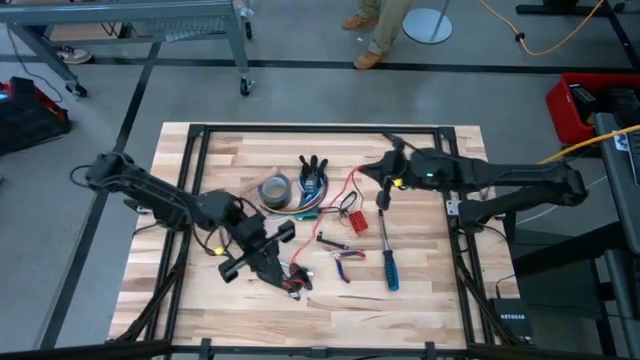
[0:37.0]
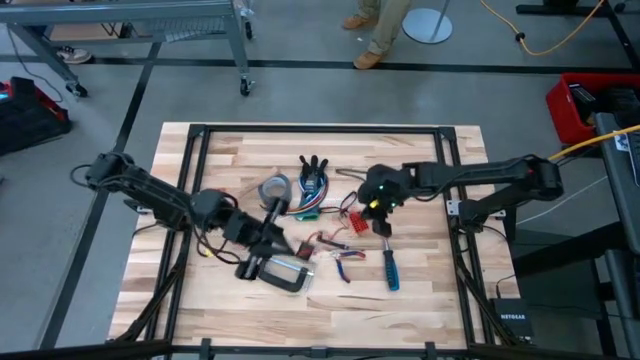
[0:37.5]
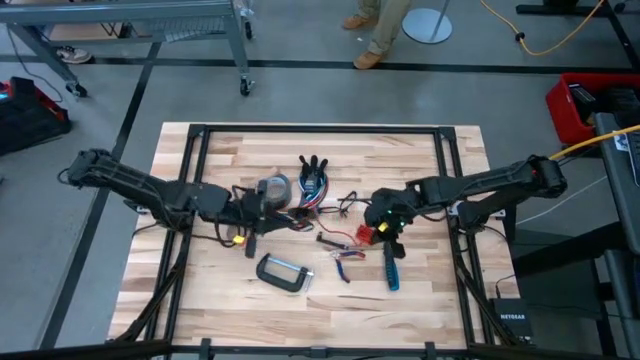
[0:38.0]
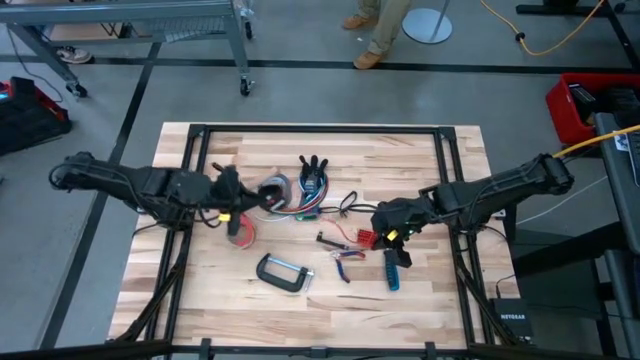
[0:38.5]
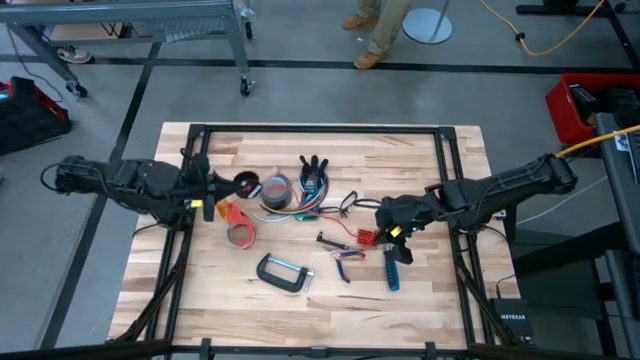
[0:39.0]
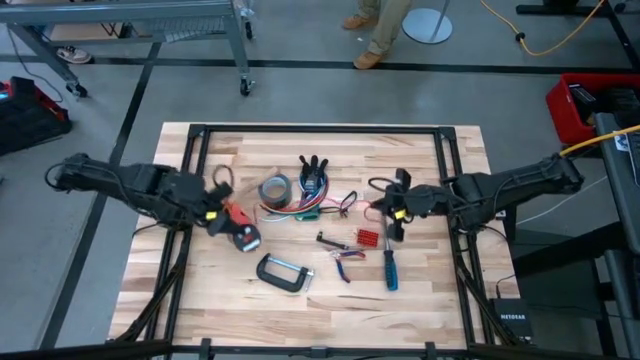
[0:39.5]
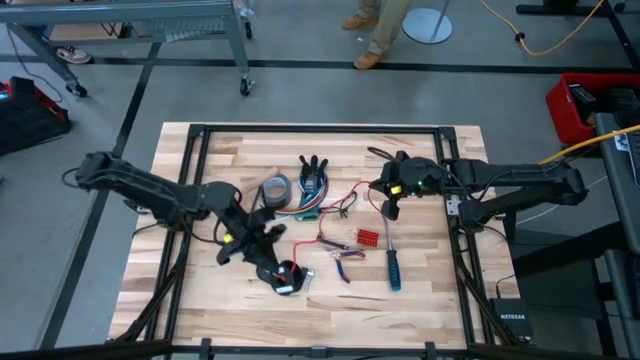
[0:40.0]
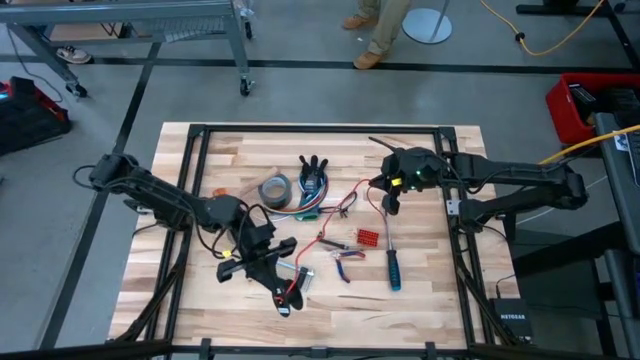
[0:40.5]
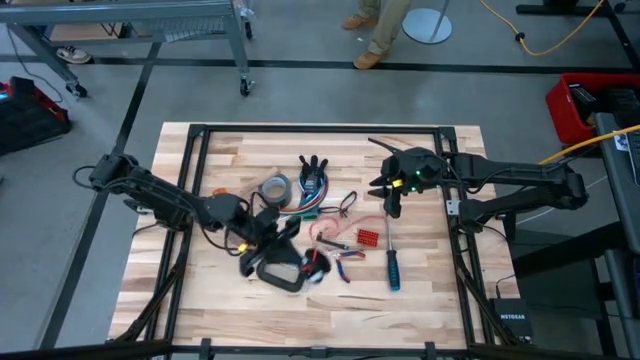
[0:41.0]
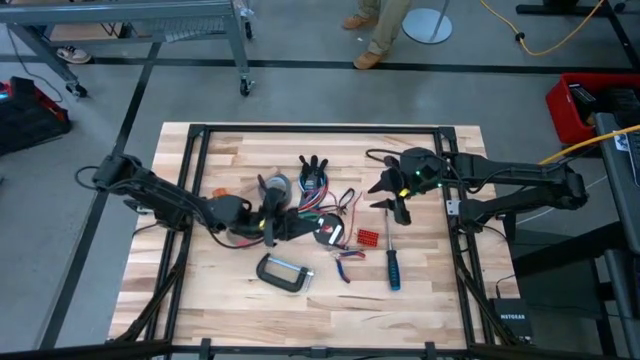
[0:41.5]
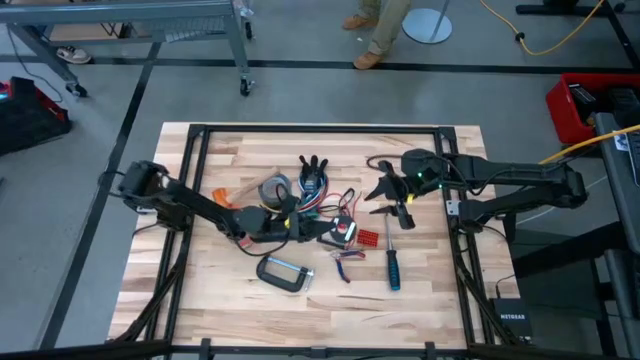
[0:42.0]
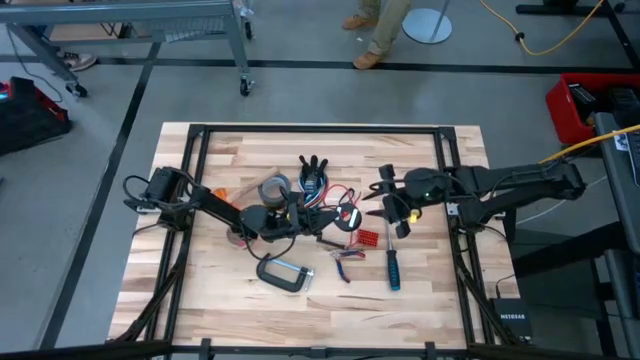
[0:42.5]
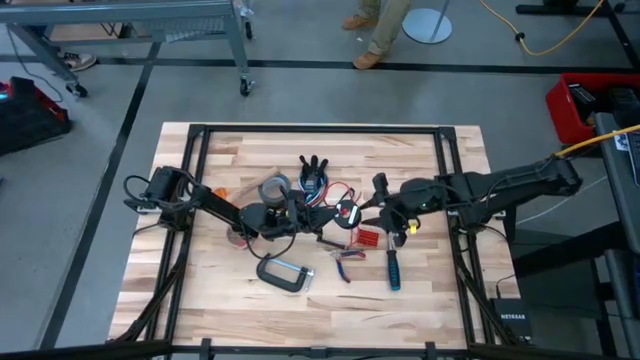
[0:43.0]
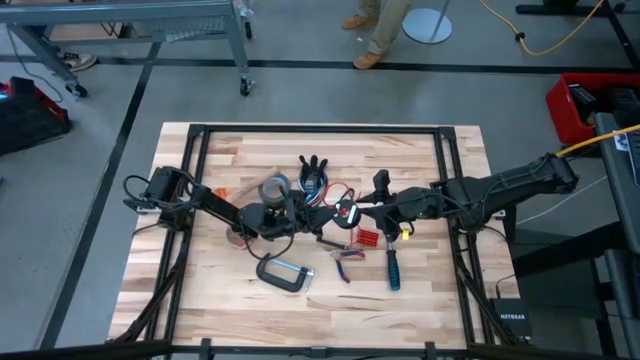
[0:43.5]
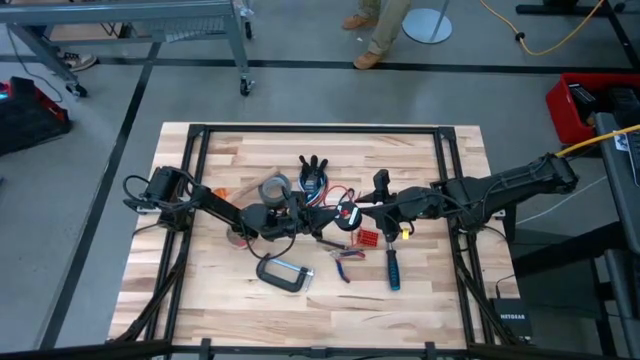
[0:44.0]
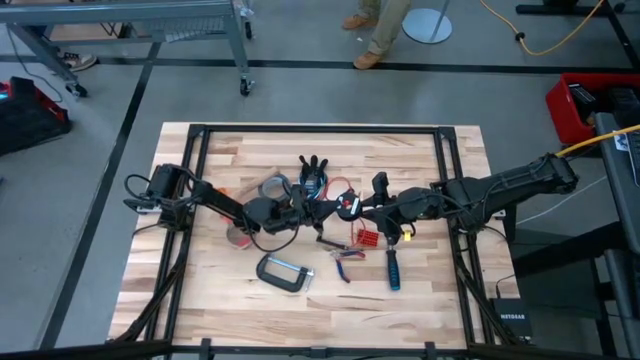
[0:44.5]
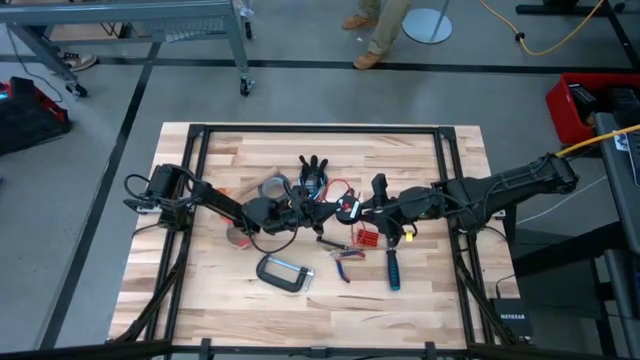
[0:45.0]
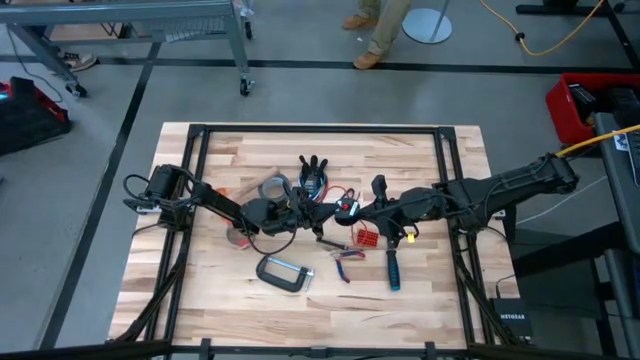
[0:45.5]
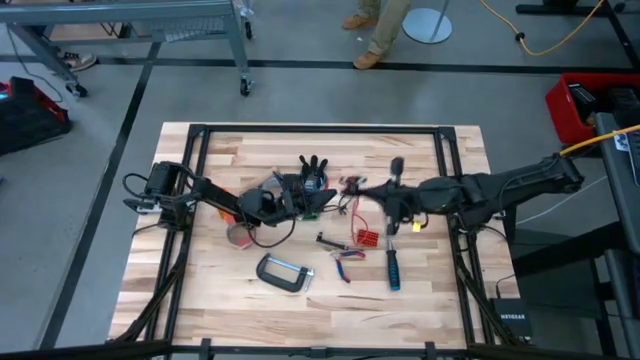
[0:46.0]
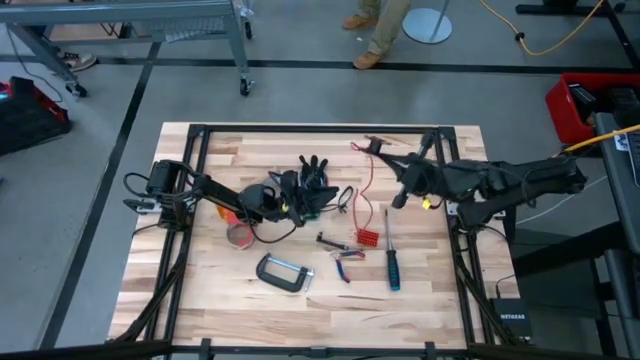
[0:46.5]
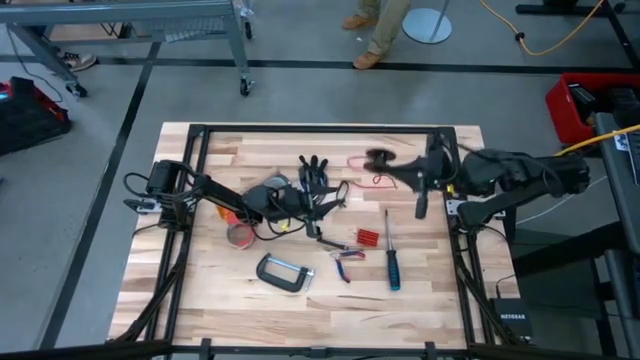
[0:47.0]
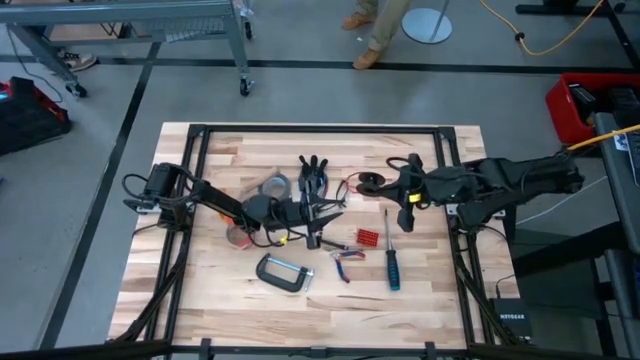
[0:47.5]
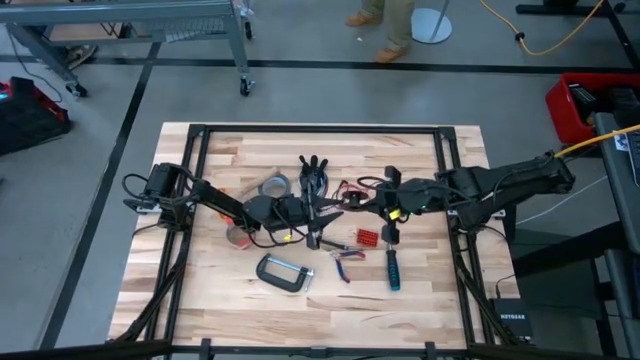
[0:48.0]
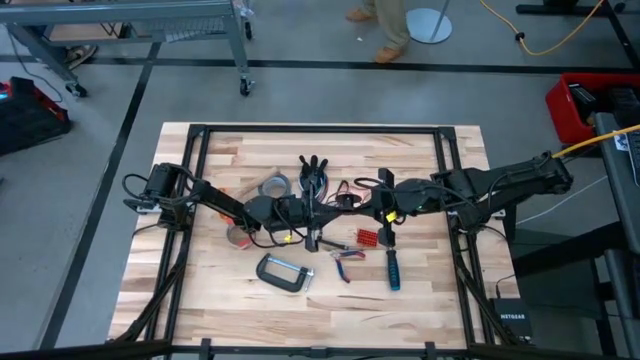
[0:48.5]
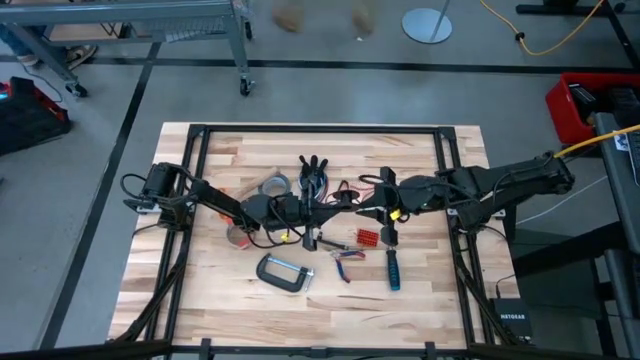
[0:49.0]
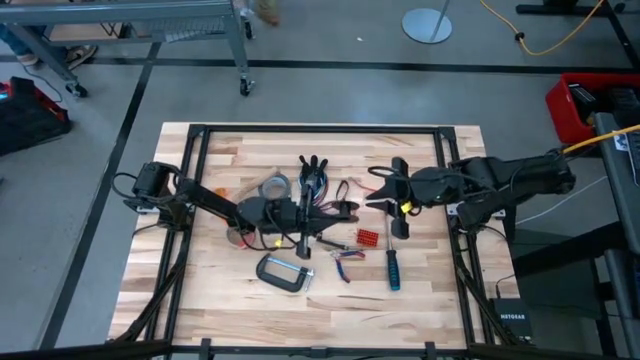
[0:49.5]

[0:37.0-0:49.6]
Task: Coil cords
Uncoil the red wire from the black spool

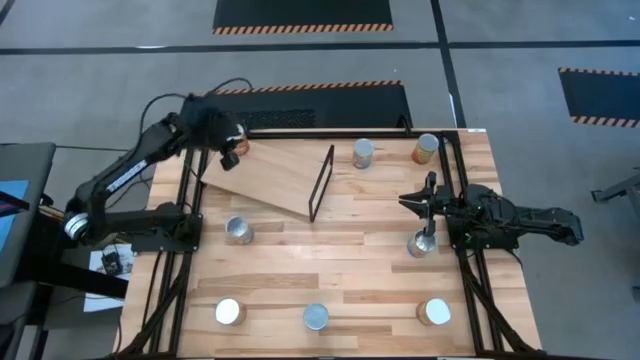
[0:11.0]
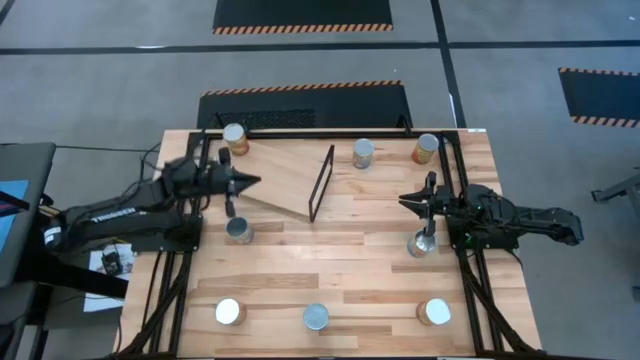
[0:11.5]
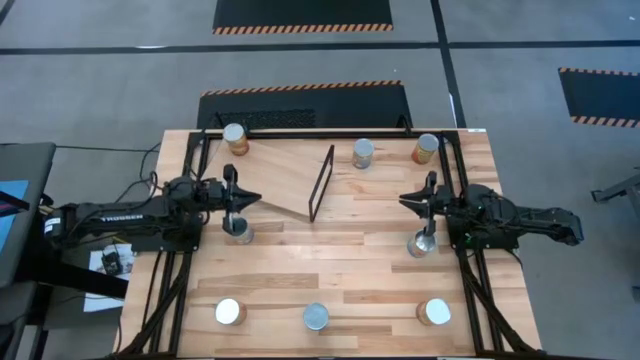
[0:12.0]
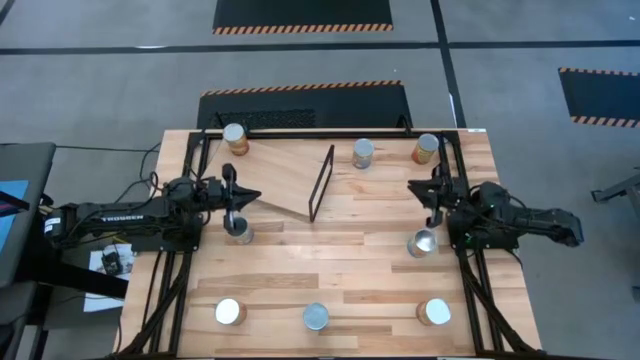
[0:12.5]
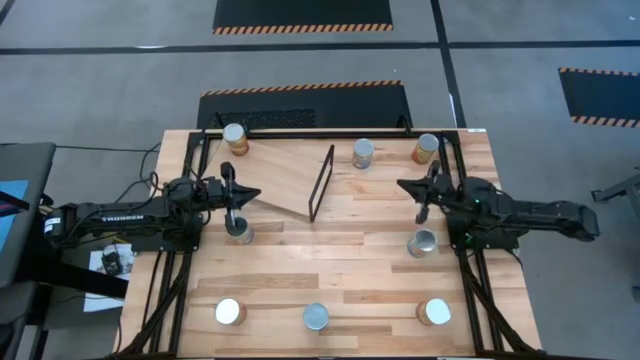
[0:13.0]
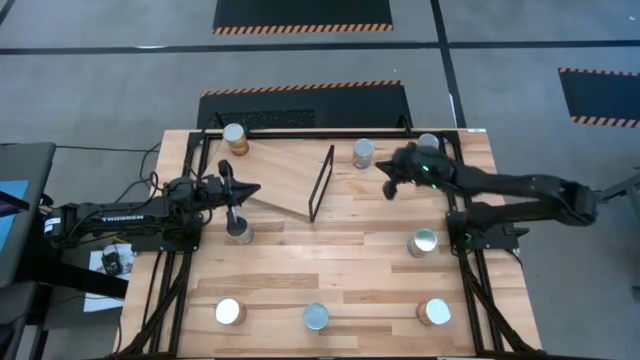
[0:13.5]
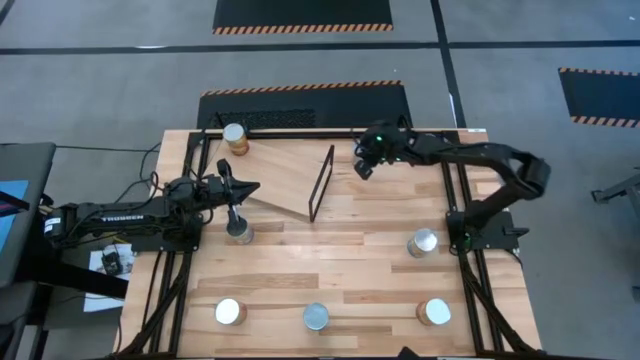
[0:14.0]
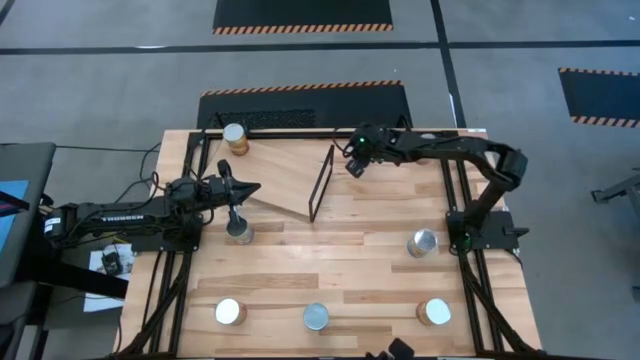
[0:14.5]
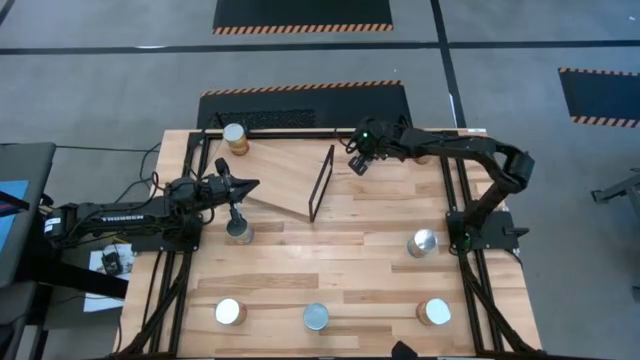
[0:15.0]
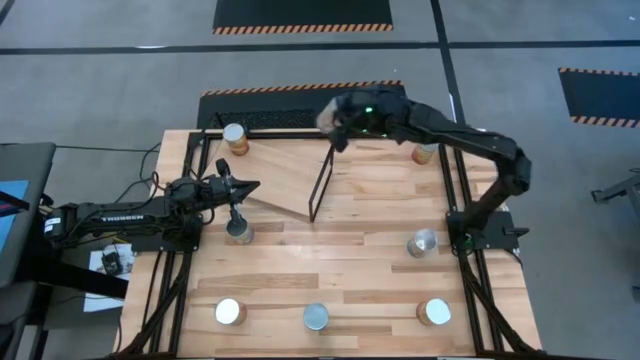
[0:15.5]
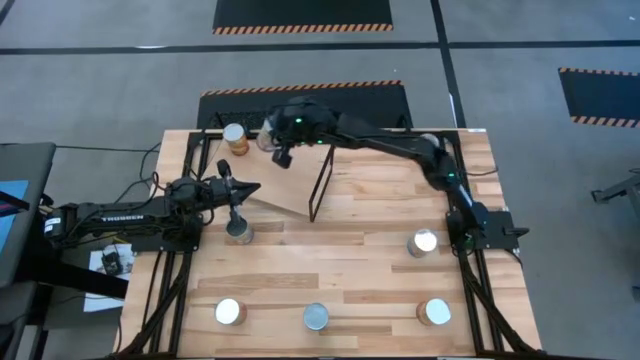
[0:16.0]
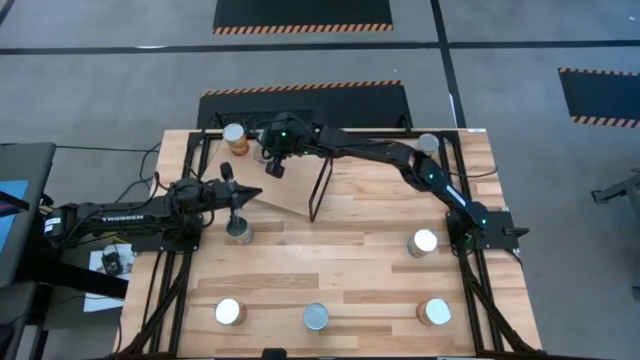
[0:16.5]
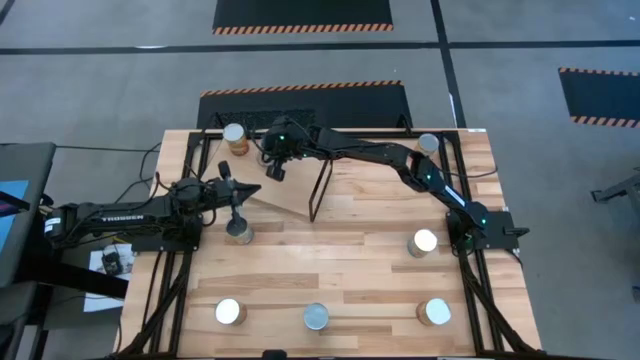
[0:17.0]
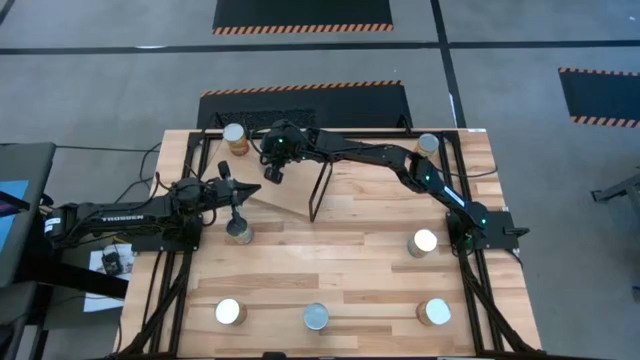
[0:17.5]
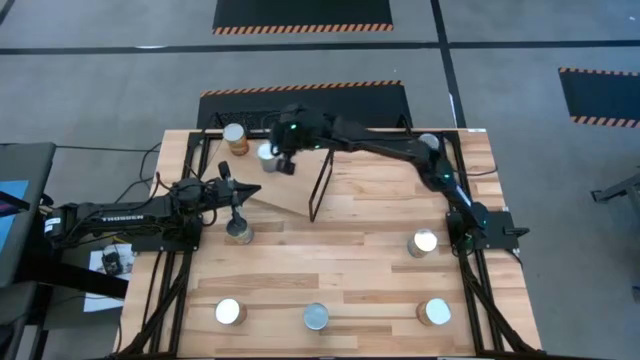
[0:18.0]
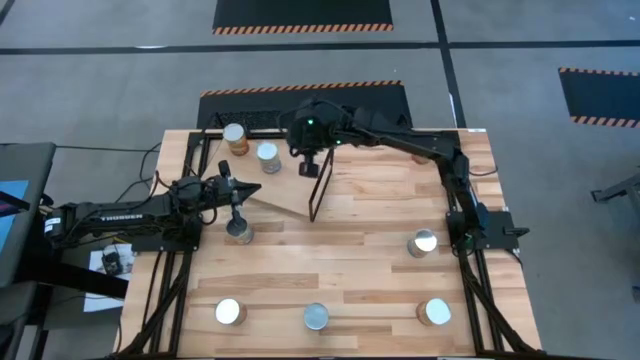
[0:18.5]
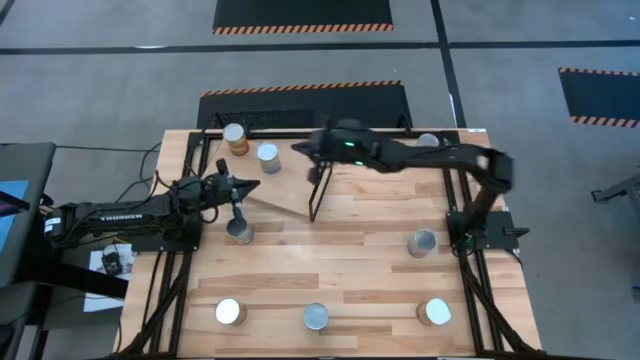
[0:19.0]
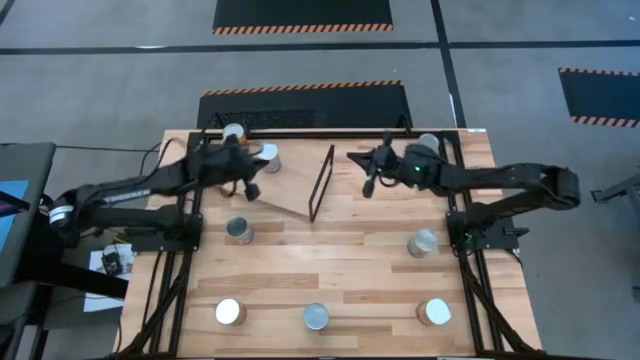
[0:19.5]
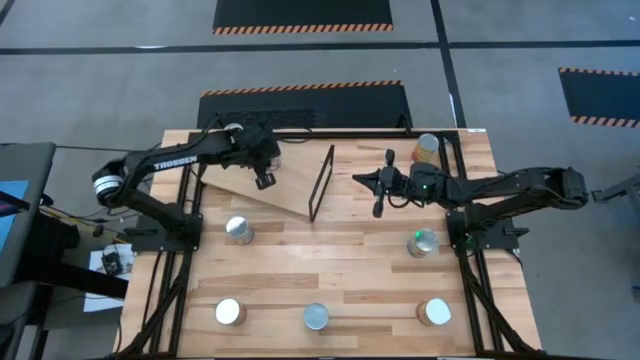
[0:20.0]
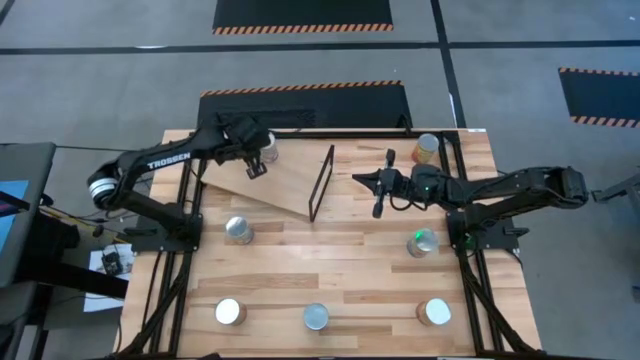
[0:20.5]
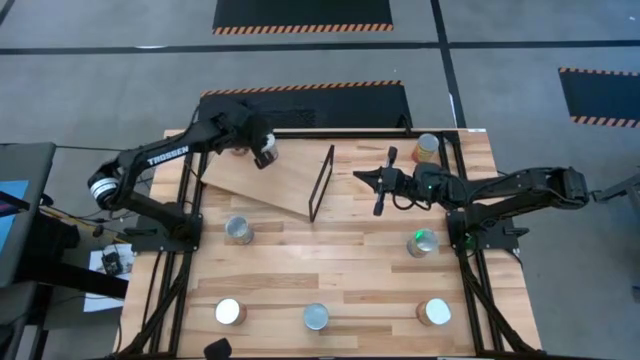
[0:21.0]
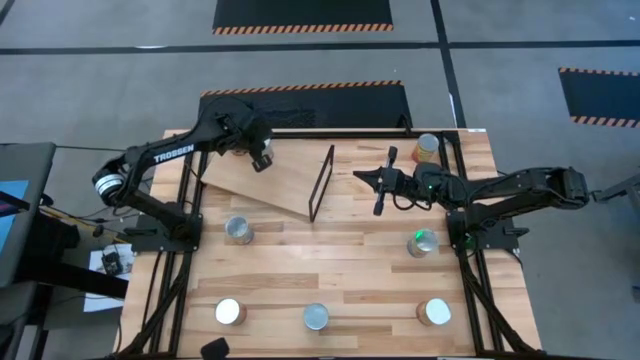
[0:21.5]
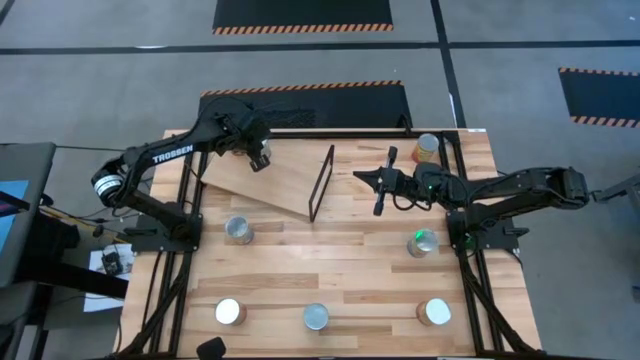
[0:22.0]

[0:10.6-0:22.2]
Task: Pick and place cans onto a shelf
Put the top canned peaches on the shelf
